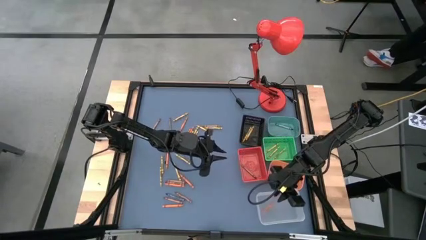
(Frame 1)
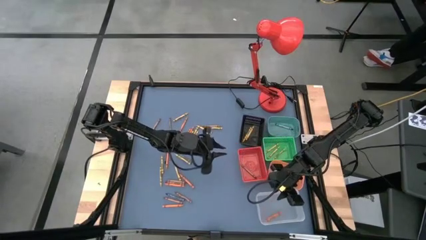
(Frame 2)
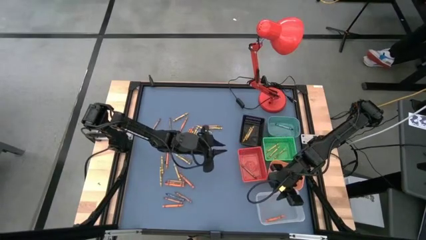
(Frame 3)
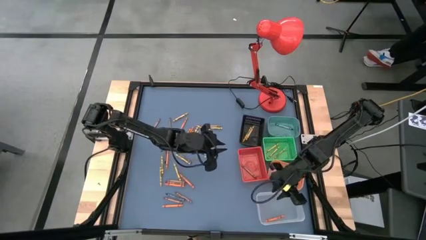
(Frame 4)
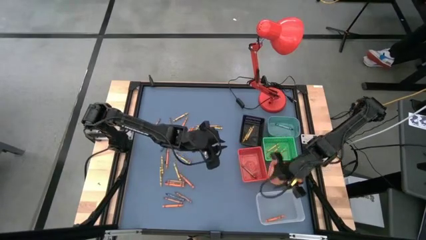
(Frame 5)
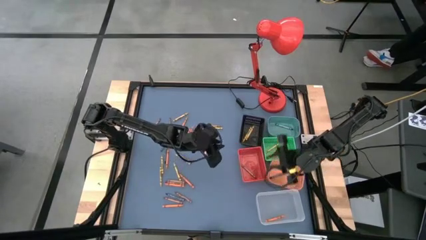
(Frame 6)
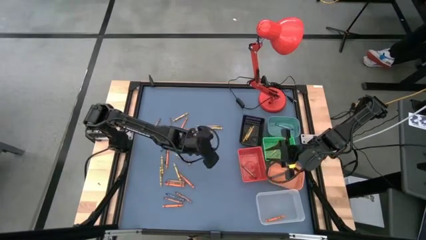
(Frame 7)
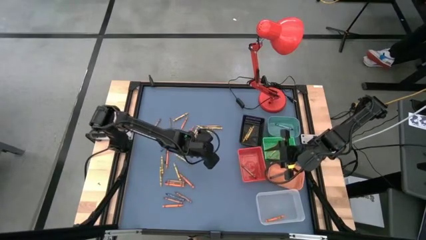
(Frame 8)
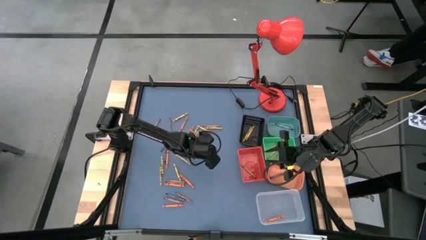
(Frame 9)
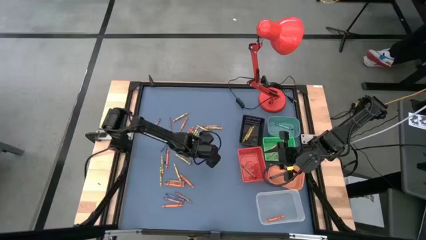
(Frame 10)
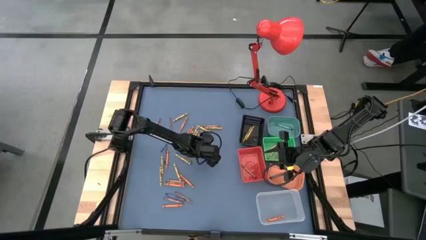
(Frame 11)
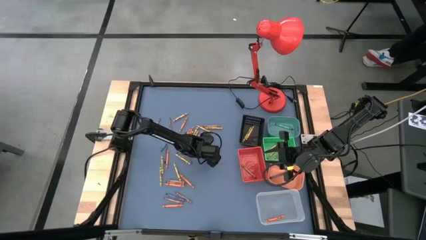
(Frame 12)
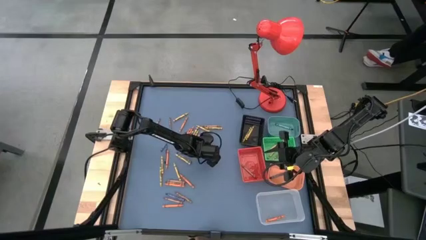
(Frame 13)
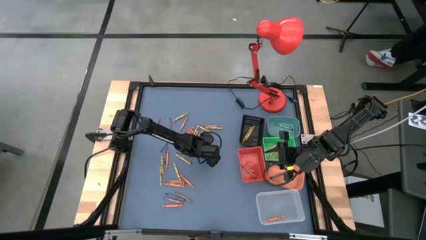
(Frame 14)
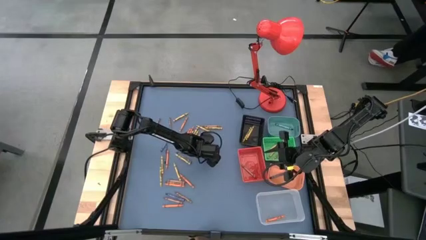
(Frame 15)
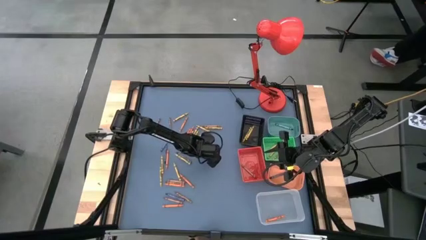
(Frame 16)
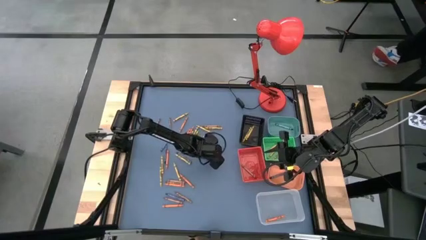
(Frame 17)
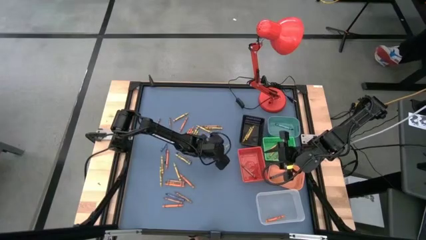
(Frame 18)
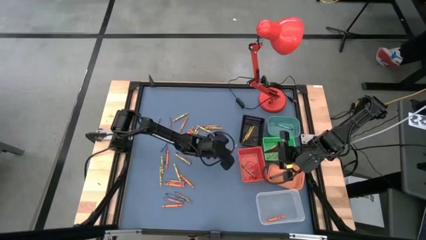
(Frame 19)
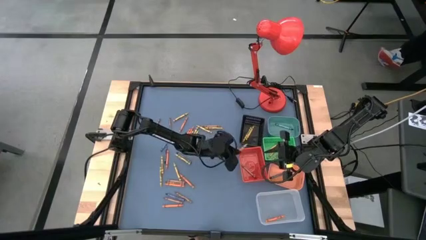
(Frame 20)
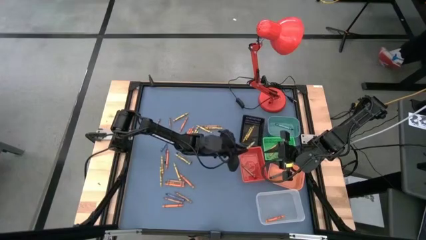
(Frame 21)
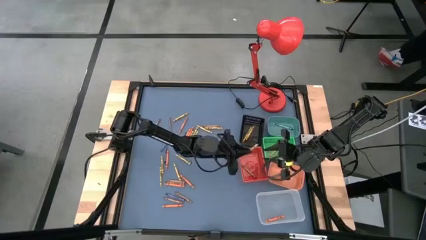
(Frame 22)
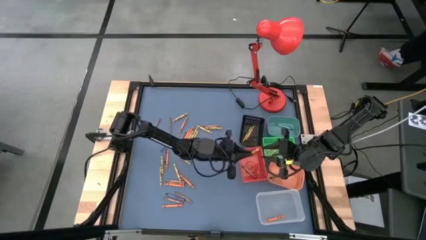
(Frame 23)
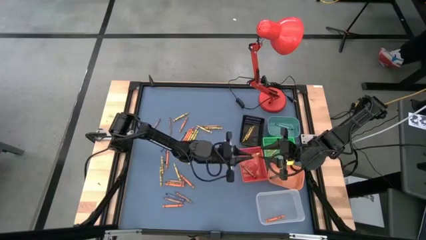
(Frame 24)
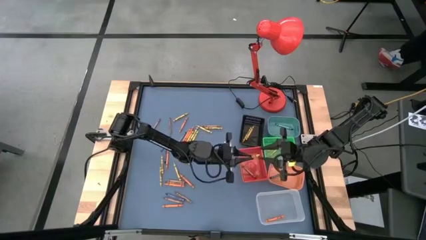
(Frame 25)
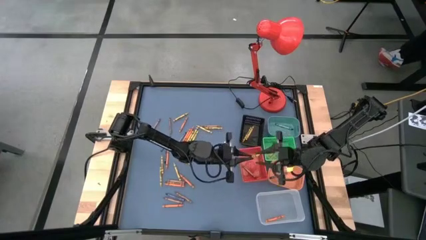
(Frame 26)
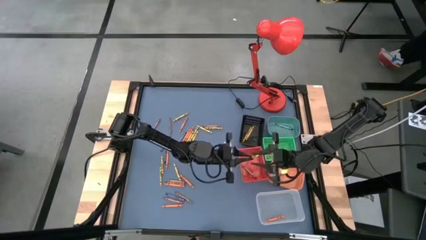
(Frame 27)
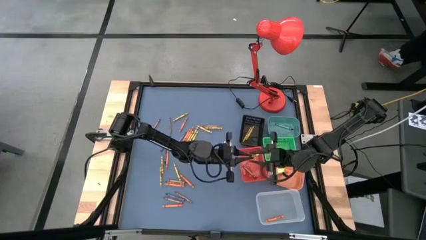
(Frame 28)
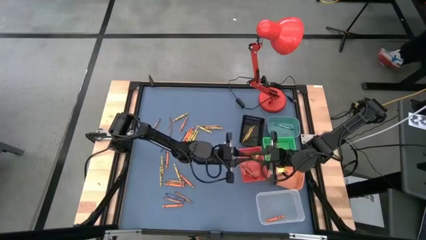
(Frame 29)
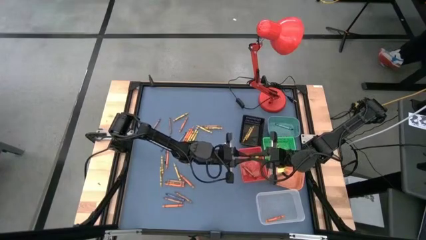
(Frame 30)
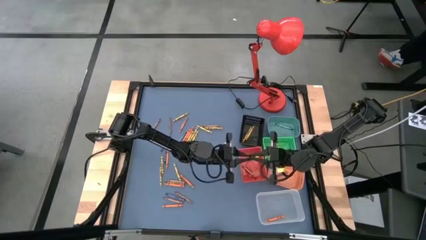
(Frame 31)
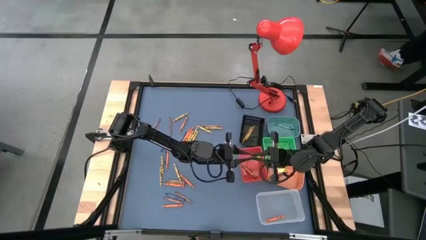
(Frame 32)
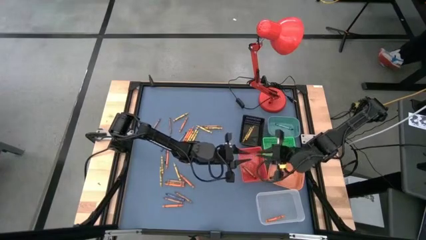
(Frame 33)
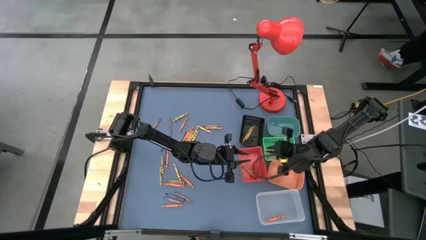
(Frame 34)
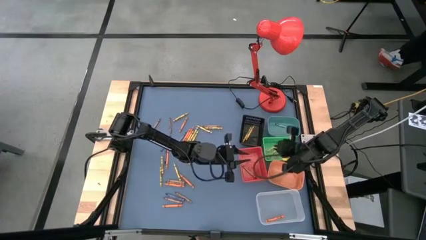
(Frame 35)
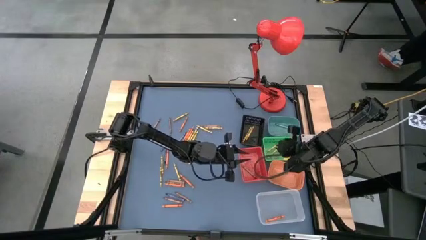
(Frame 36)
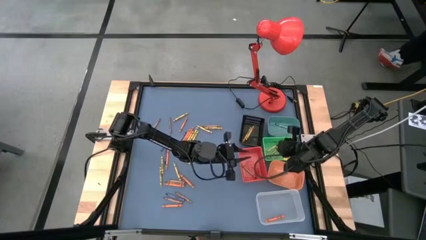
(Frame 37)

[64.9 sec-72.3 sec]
Task: Sort crayons
Put the yellow green crayon into the green basket

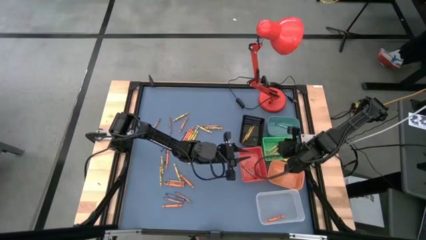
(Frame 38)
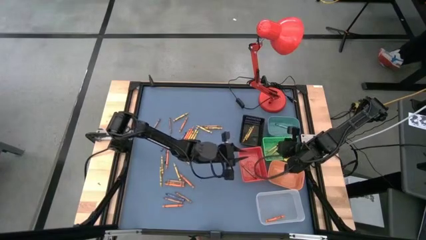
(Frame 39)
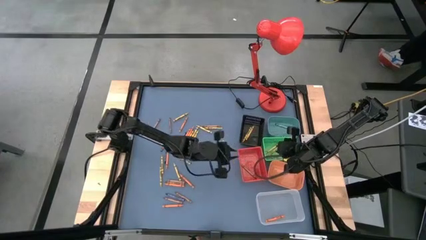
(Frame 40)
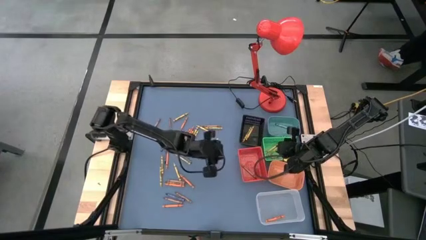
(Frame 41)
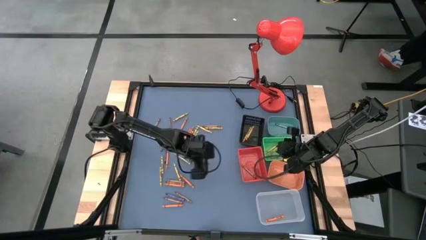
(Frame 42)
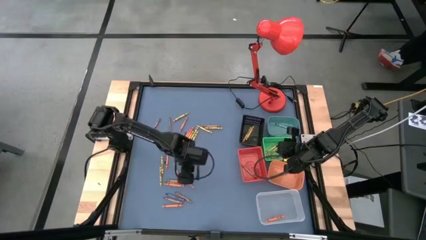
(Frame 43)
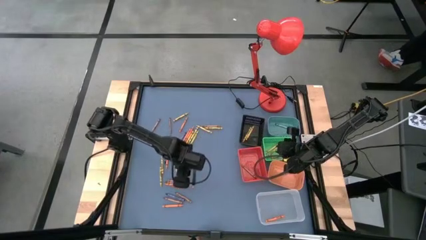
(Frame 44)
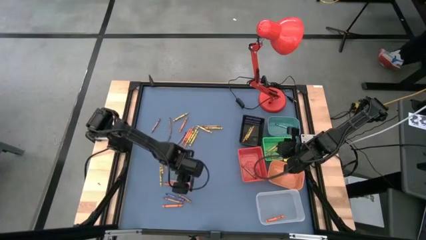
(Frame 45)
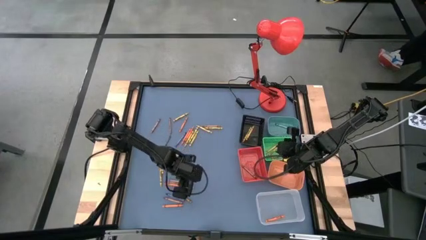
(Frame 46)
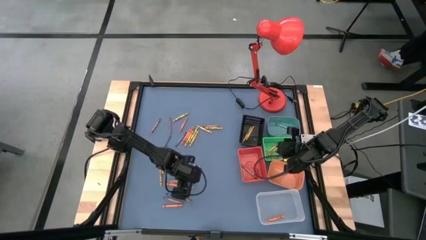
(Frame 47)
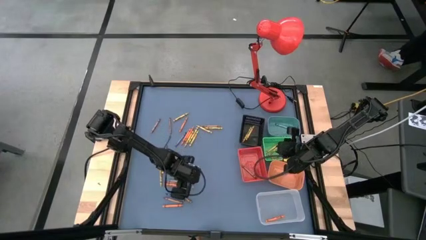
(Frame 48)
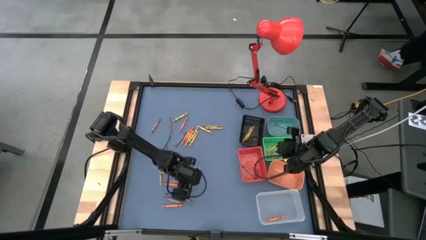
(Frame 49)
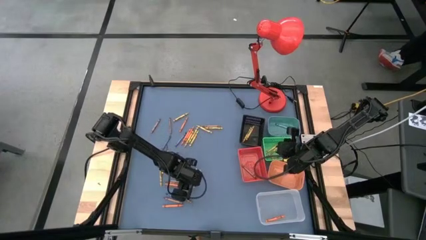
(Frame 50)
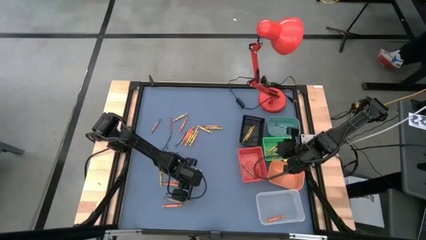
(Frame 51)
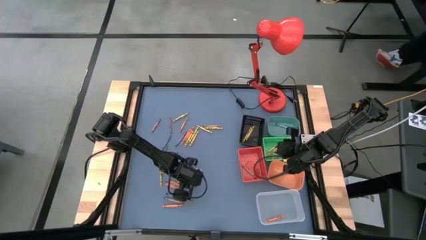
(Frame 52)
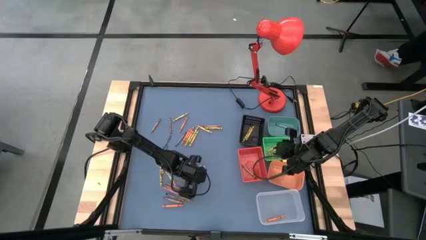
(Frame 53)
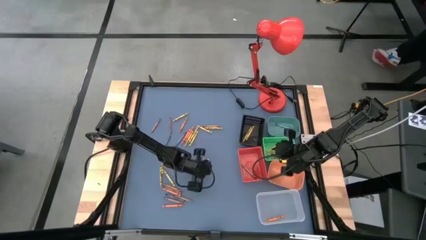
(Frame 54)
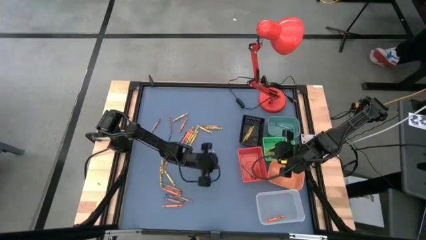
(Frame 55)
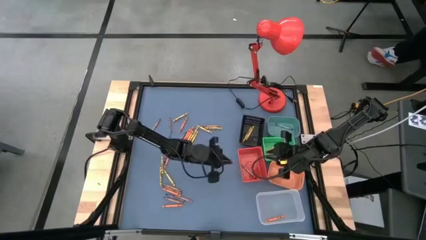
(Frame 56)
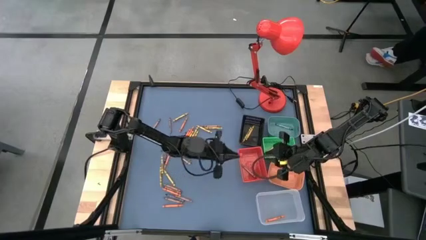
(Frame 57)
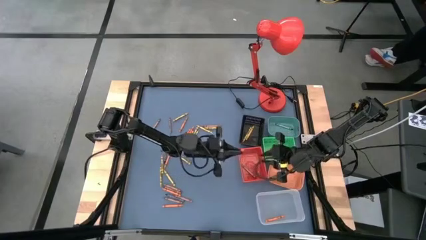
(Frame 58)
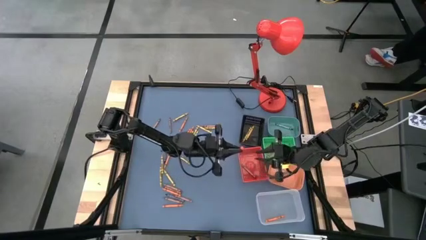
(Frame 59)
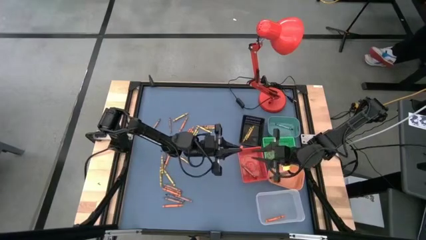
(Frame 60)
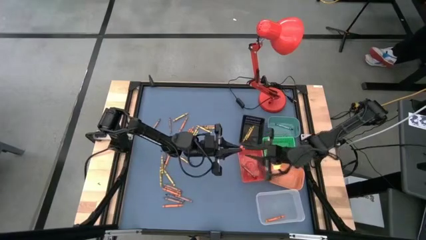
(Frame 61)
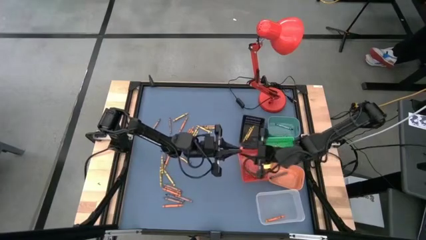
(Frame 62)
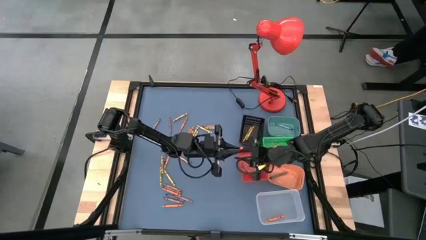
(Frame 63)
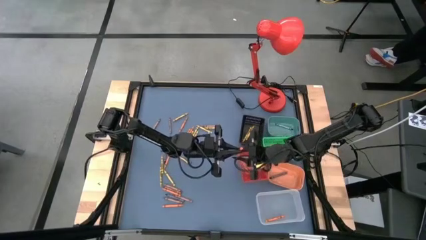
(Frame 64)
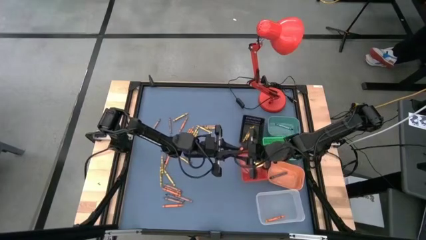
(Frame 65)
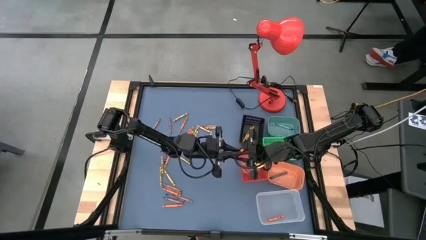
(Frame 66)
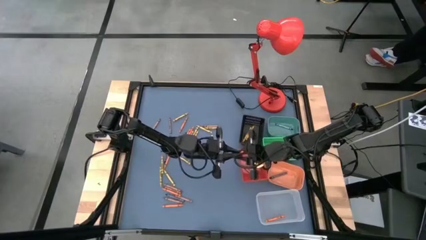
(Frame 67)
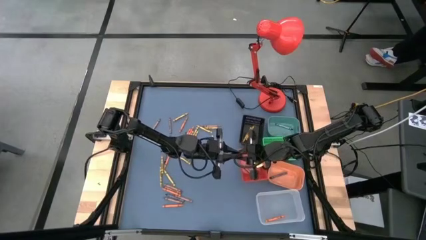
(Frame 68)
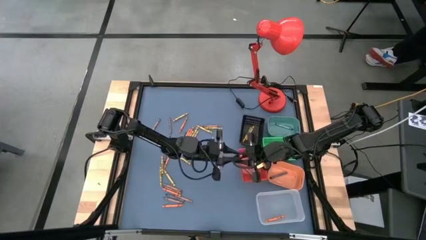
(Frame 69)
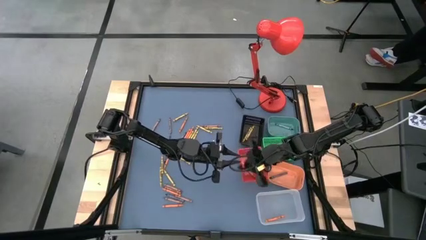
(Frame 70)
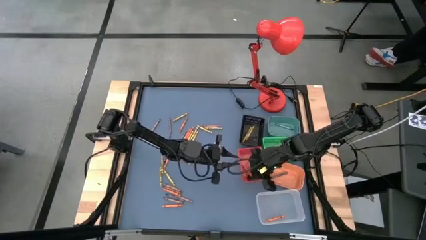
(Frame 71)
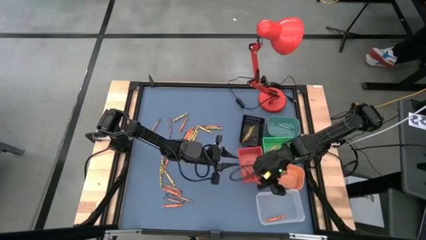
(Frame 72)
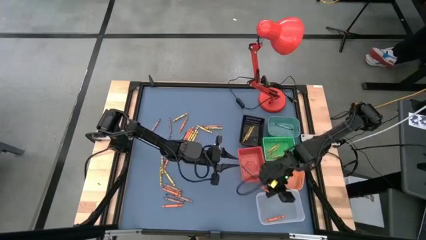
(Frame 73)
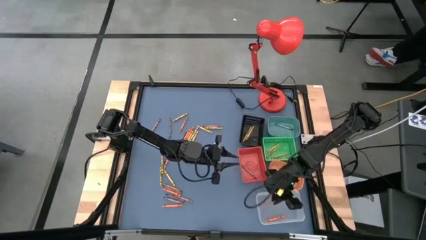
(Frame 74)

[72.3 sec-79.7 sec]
Put the orange crayon into the transparent bin

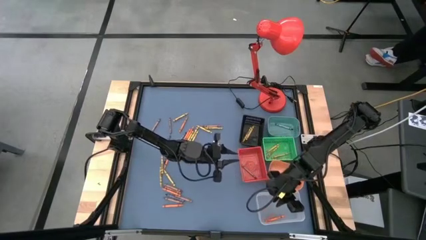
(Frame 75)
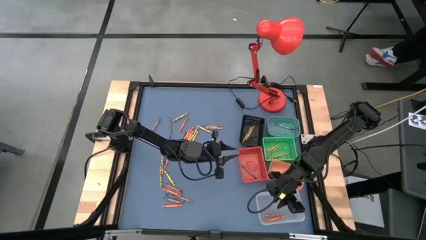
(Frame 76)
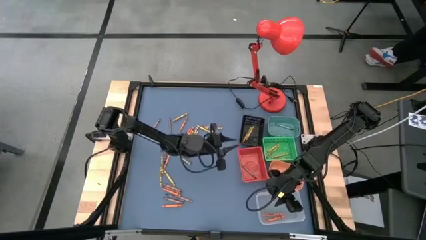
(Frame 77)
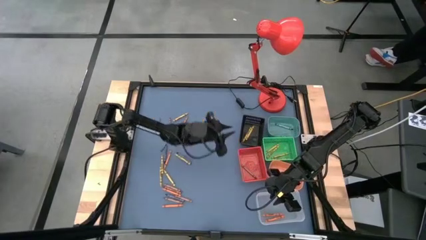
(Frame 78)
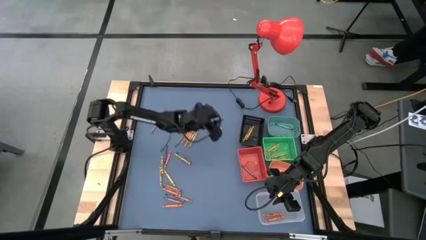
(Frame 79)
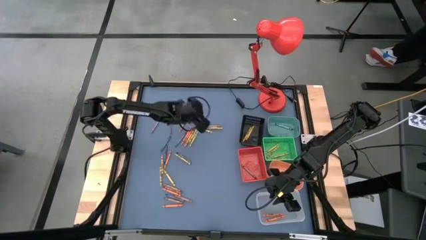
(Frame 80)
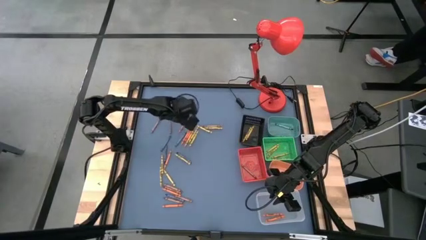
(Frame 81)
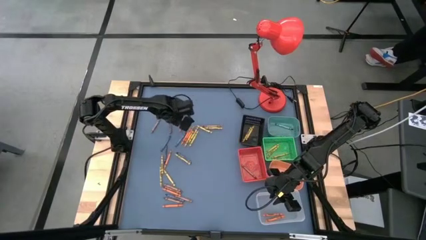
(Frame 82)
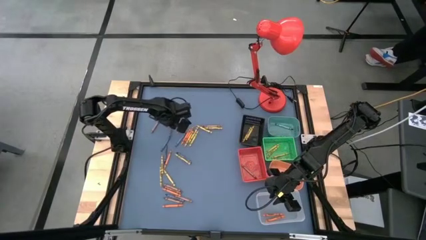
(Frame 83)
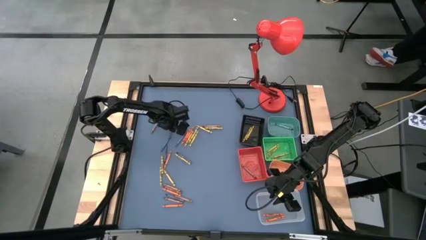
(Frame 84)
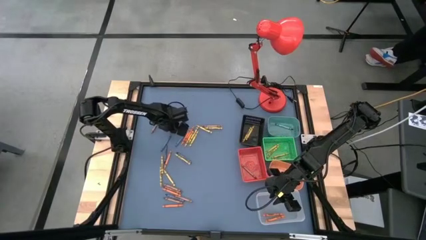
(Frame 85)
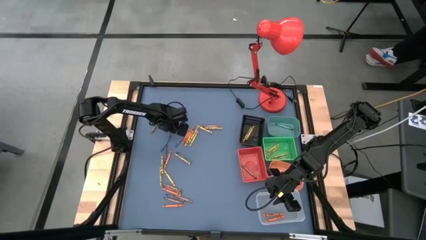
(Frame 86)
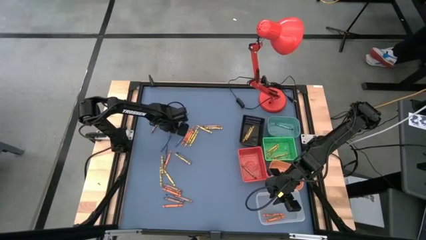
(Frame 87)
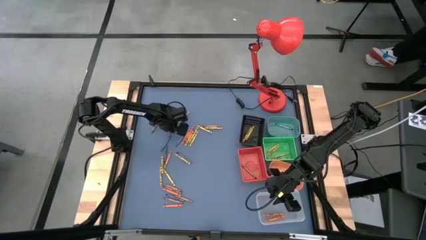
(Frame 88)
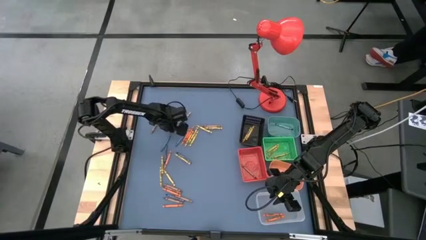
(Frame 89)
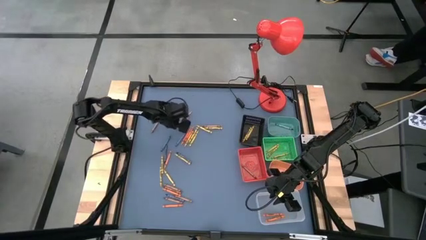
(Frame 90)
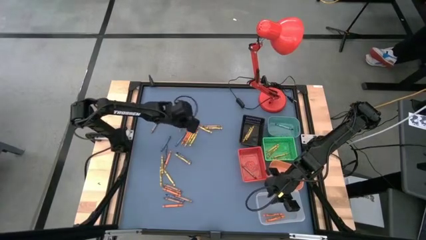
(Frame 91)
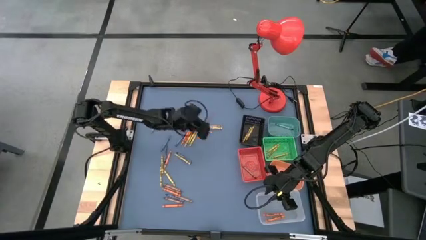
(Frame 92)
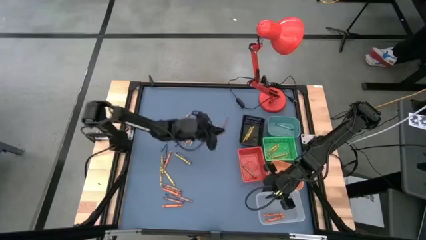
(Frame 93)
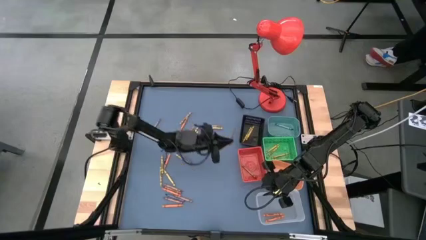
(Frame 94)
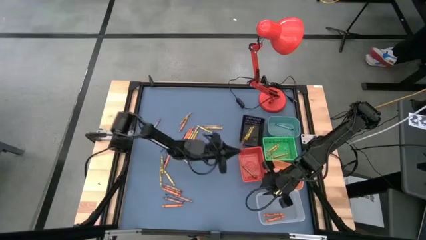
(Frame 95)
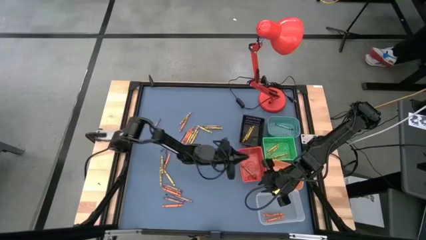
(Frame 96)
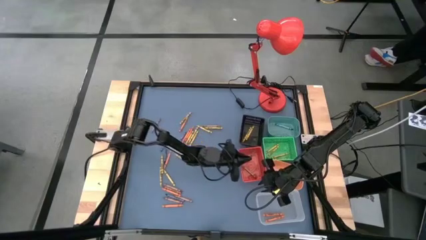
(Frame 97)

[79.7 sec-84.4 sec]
Put the brown crayon into the red basket
